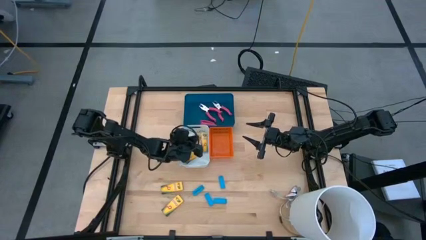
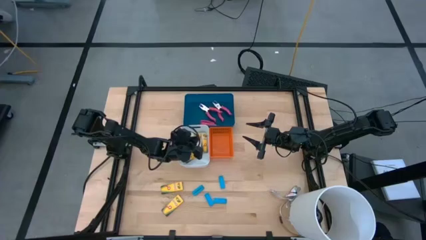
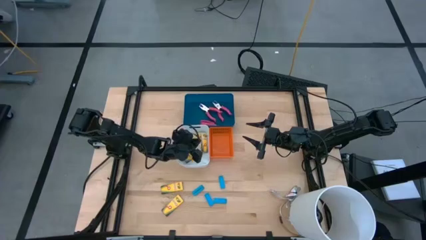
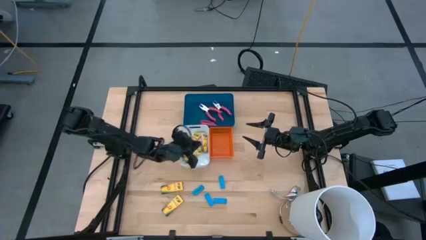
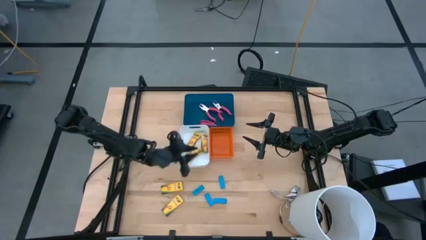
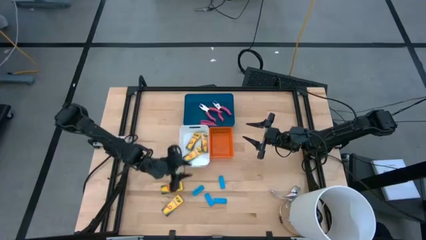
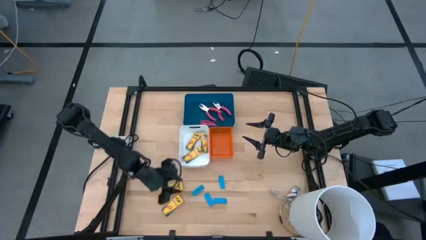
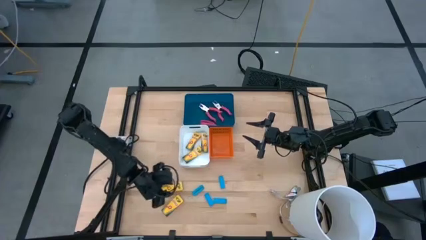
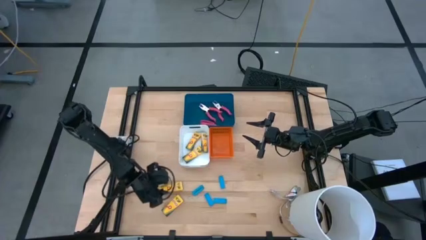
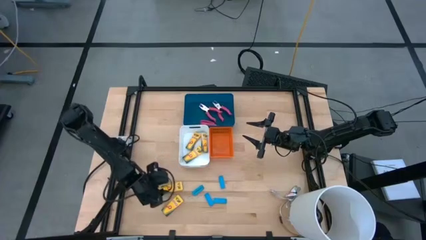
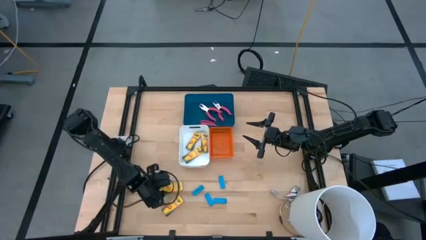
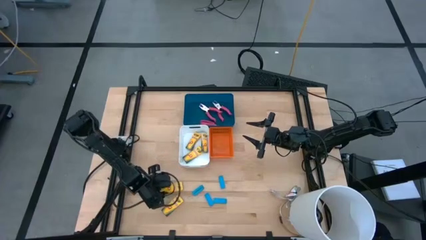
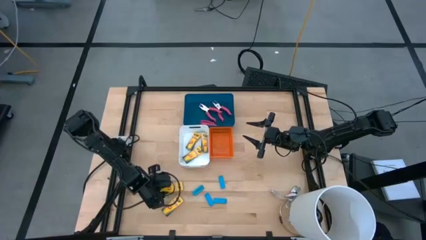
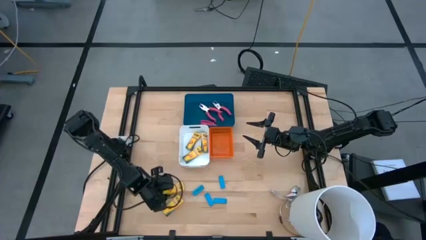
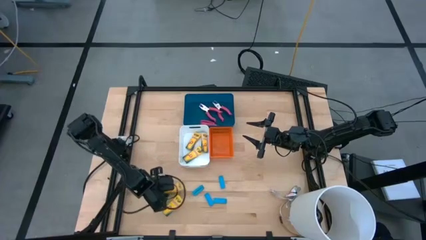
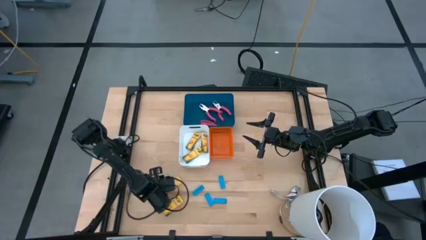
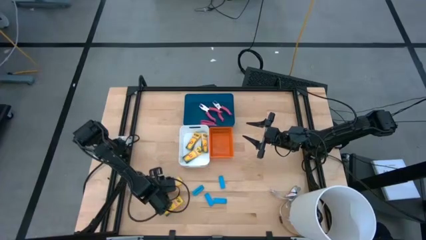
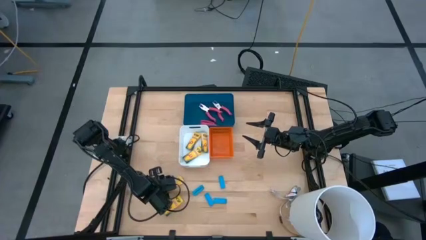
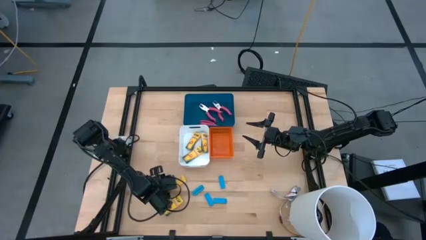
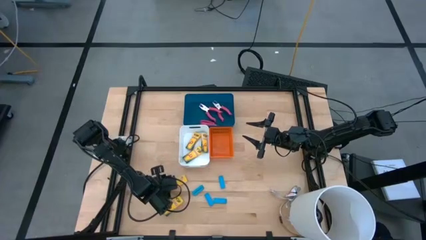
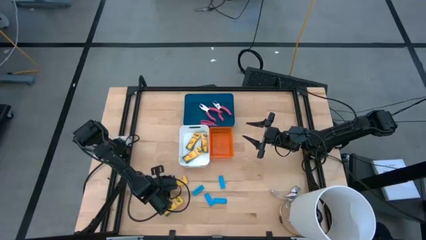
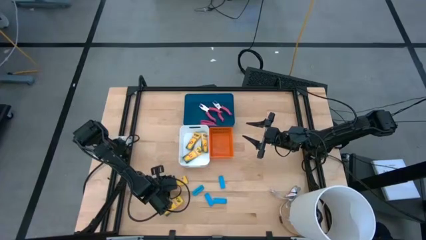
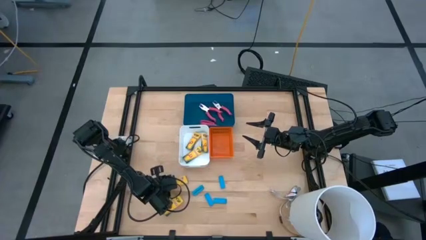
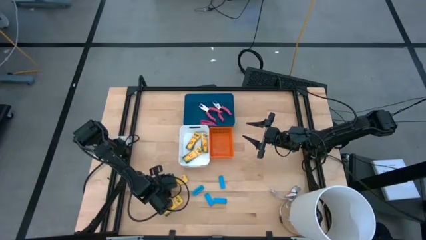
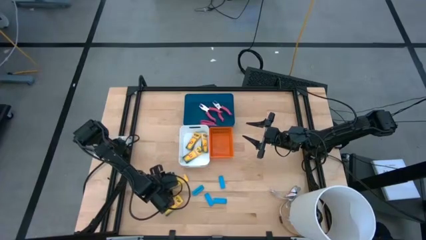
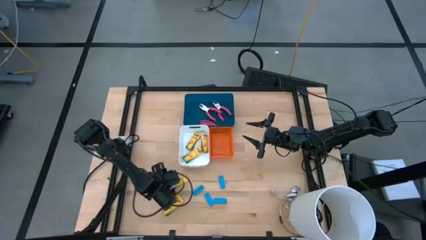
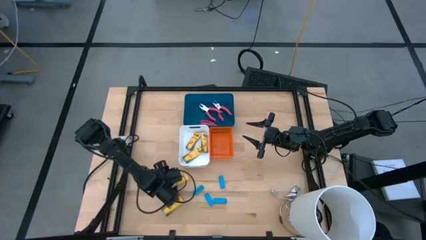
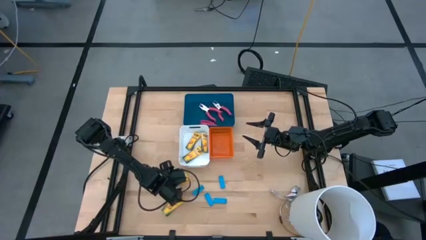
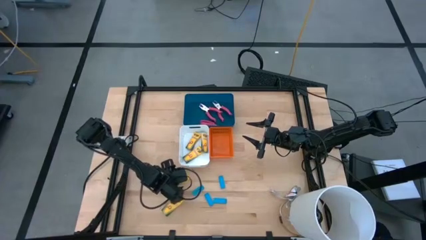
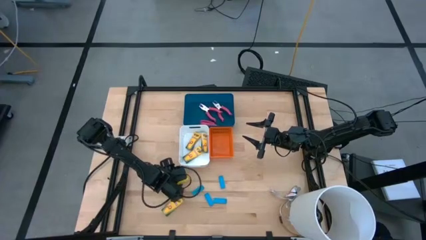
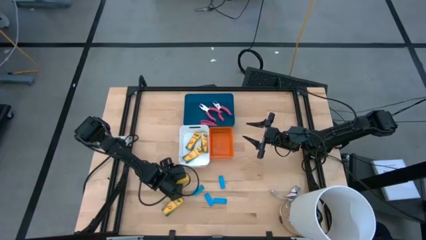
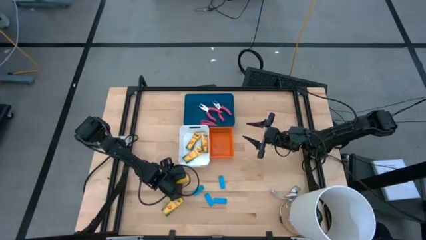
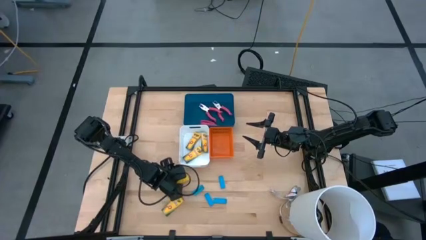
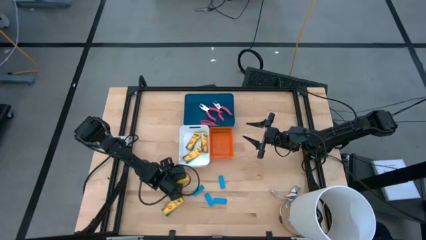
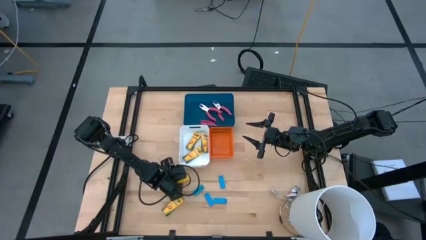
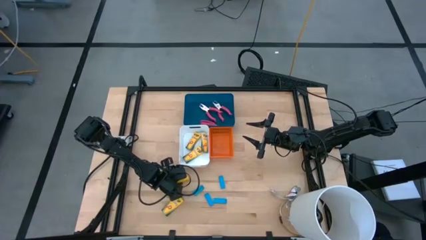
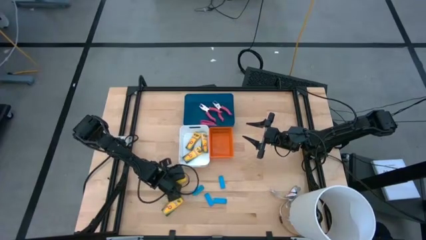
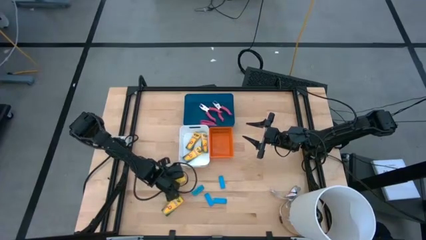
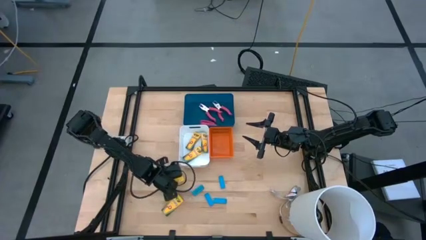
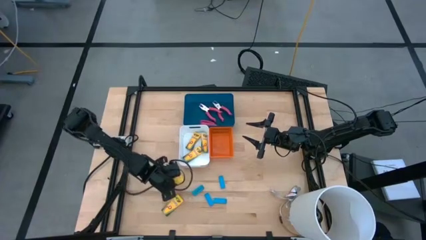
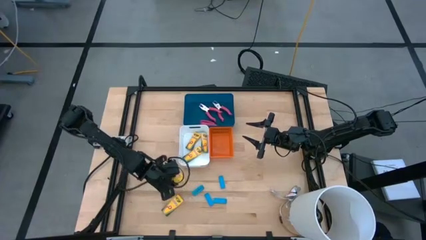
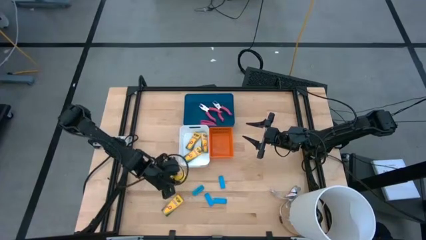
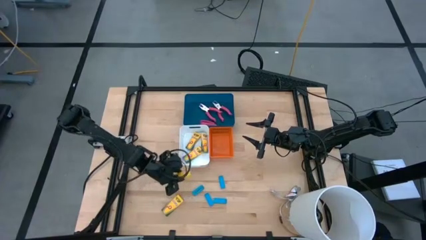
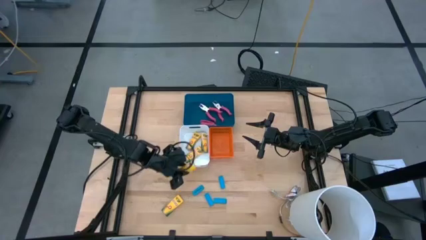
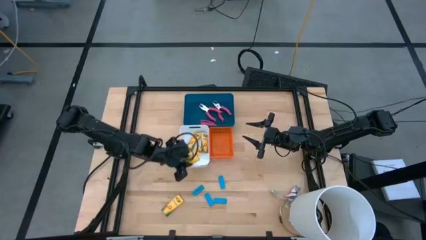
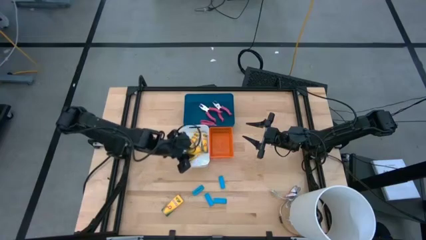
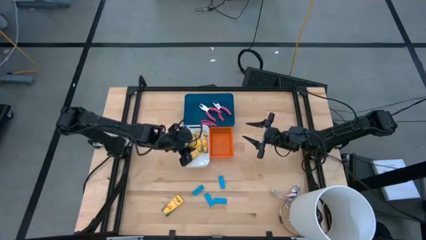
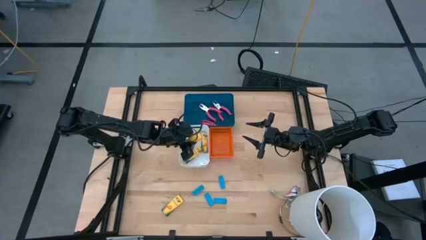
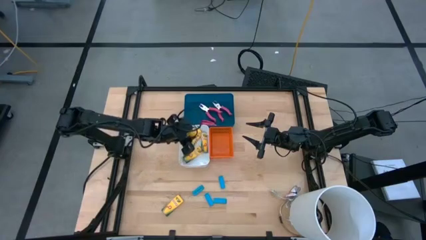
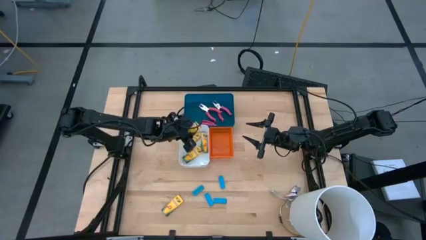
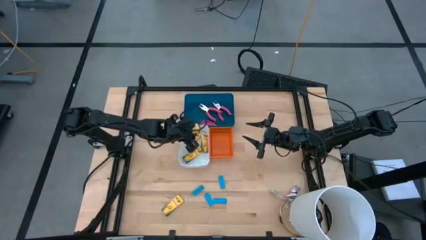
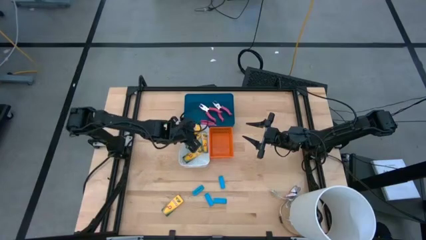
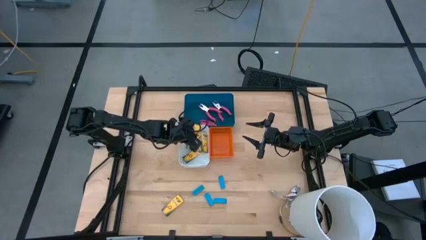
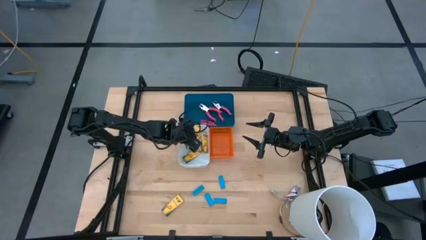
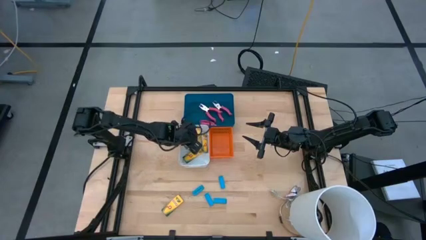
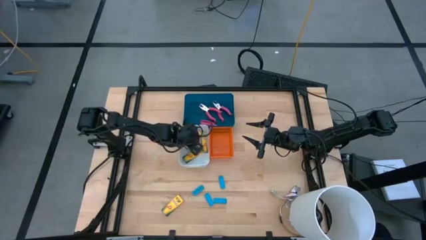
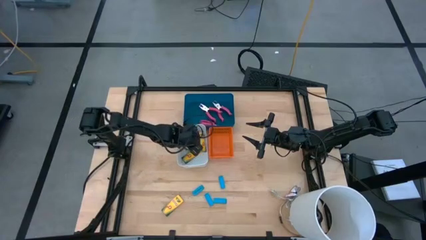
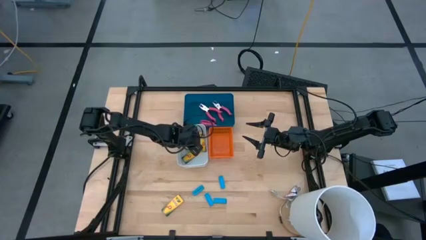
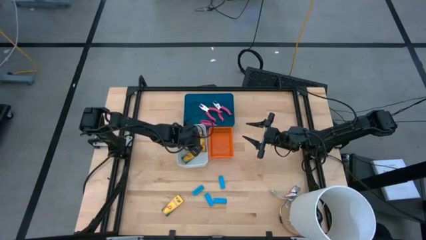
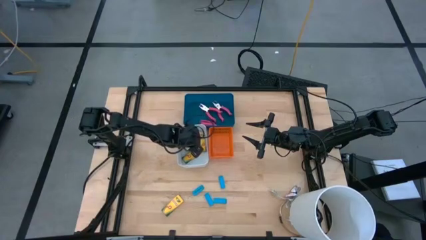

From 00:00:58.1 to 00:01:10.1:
Task: Pick & Place School Supplies
Put the yellow crayon box into the white bin

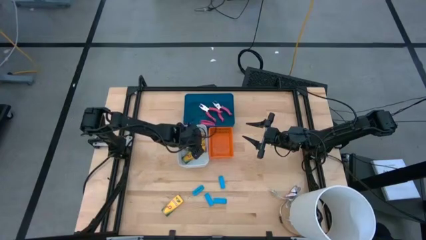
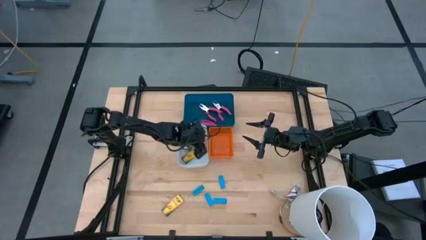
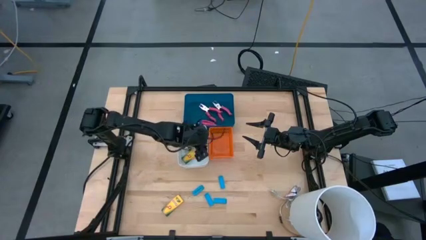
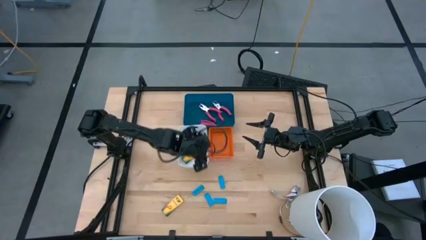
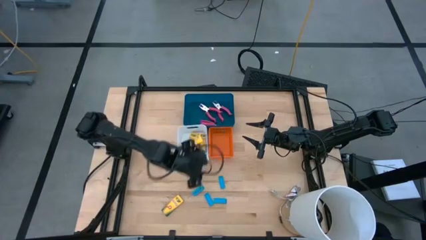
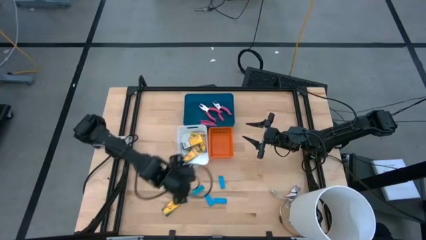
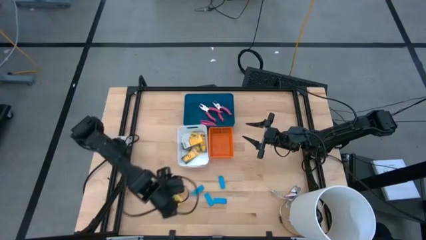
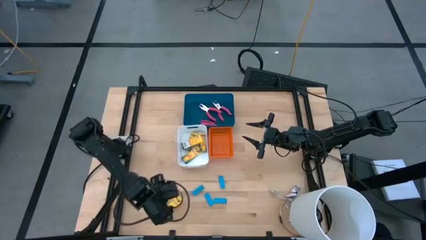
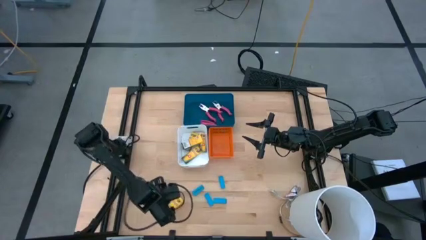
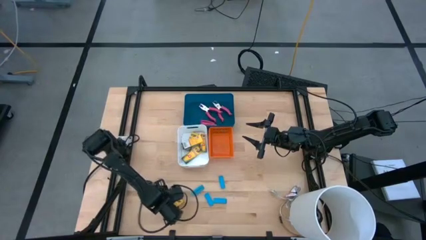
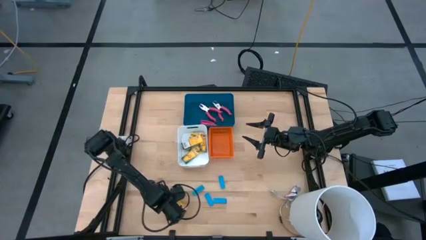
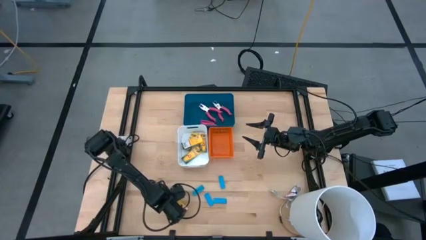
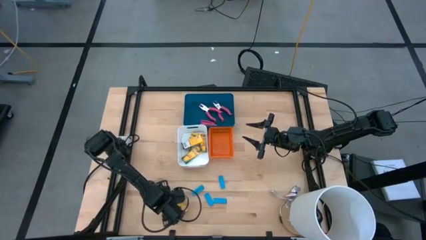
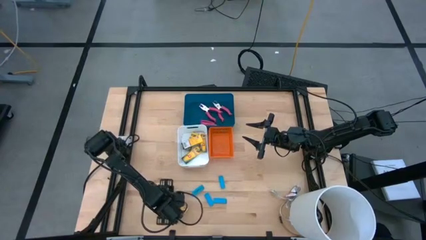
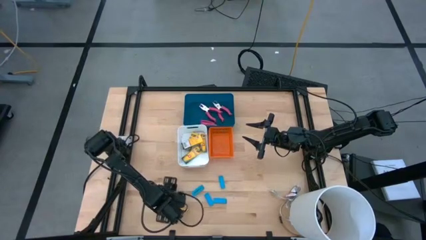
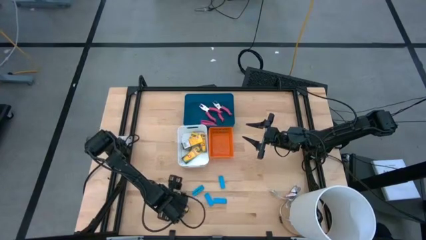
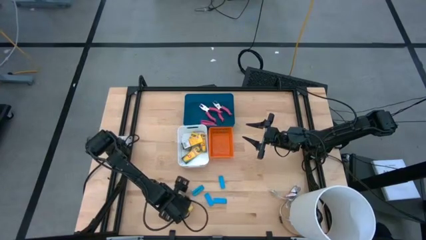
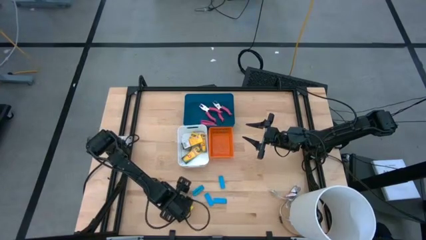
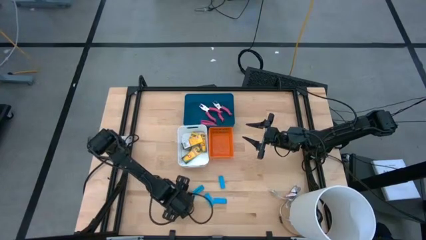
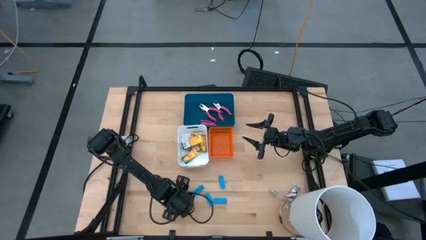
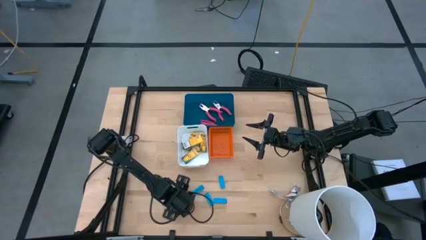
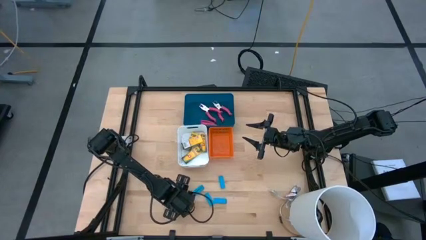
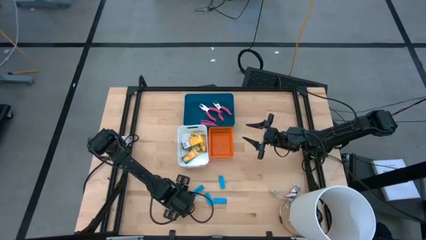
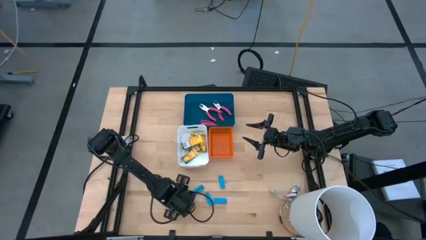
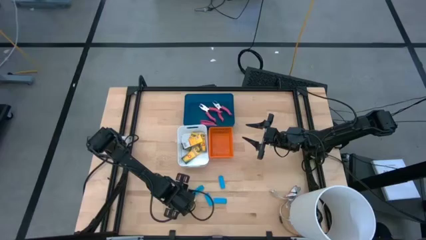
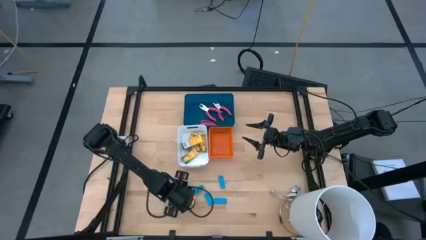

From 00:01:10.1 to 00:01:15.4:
Put the yellow crayon box into the white bin

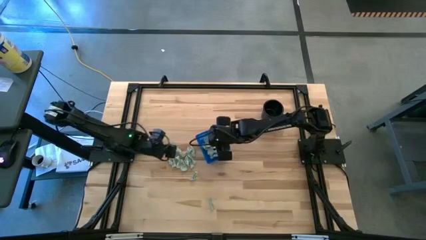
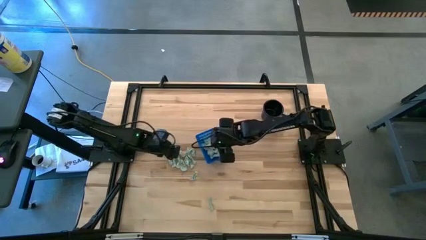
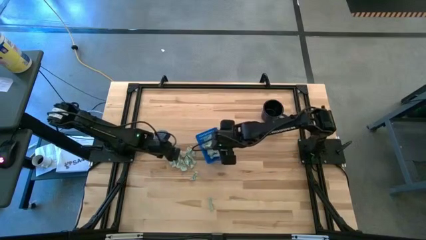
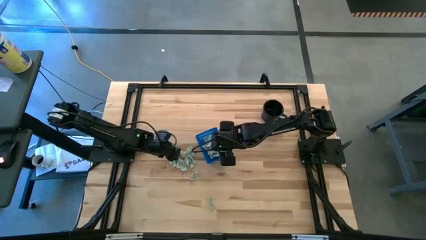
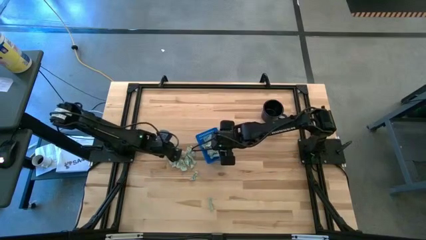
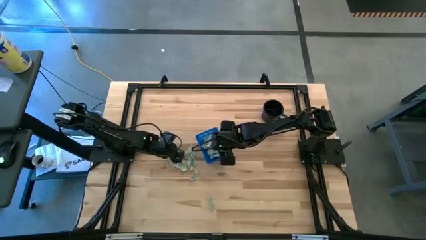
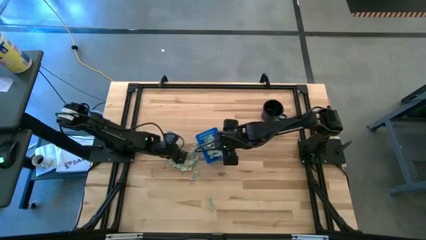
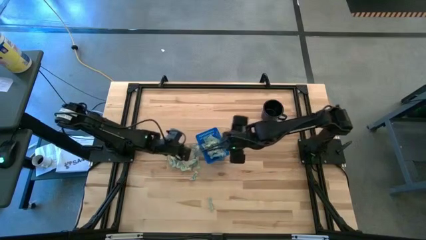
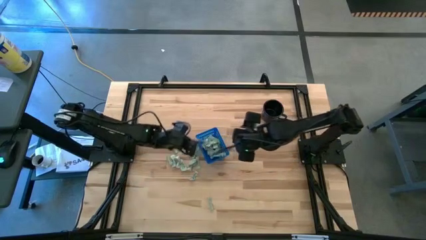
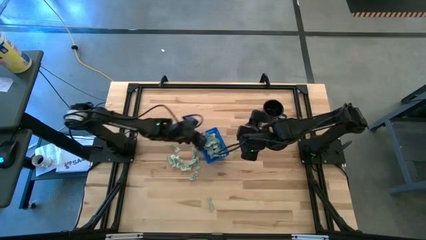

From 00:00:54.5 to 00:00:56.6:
Task: Pick and place Stevia / Truvia into bins
Put the stevia packet into the basket
